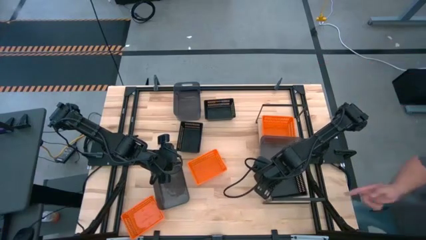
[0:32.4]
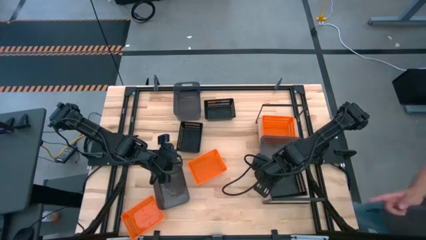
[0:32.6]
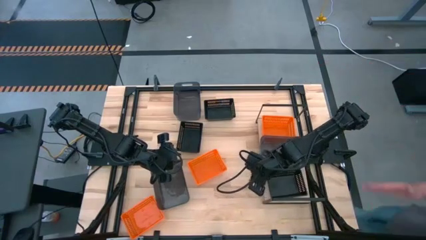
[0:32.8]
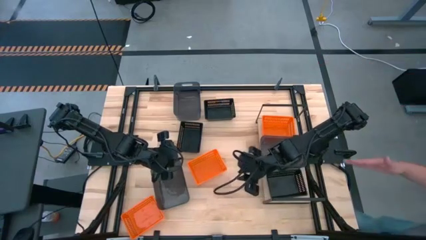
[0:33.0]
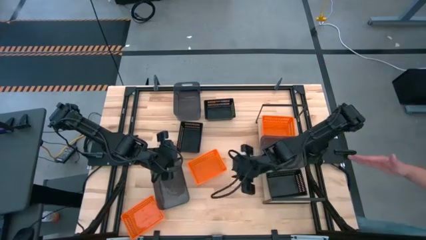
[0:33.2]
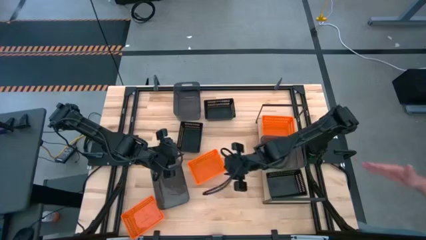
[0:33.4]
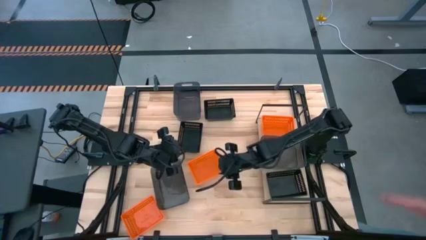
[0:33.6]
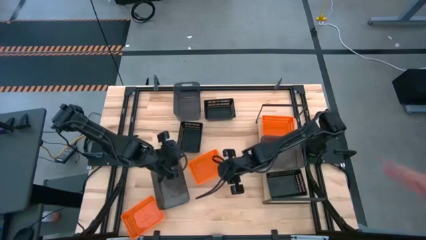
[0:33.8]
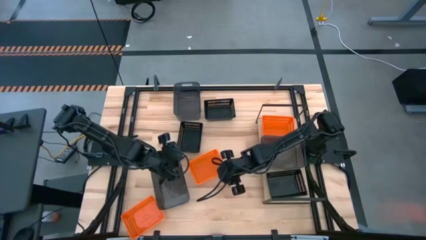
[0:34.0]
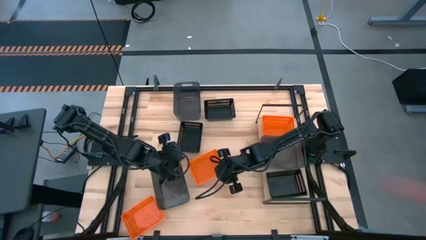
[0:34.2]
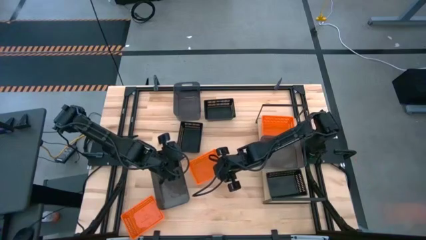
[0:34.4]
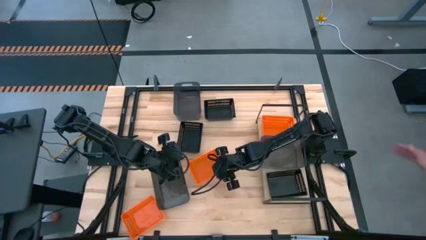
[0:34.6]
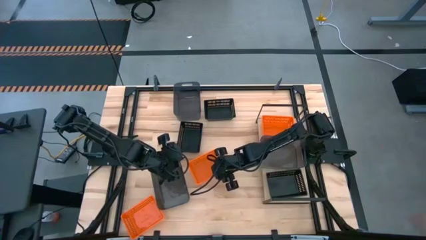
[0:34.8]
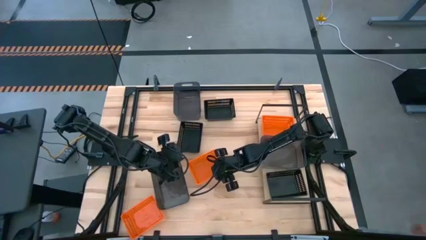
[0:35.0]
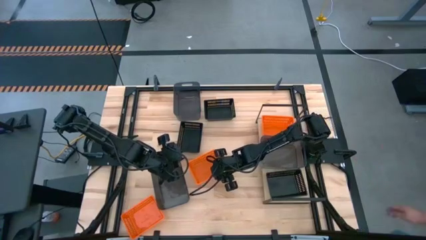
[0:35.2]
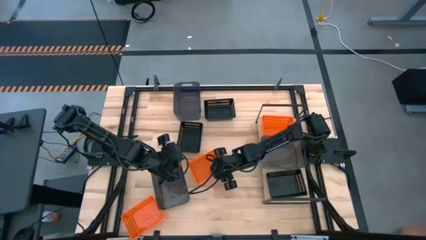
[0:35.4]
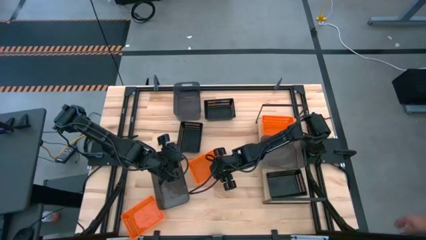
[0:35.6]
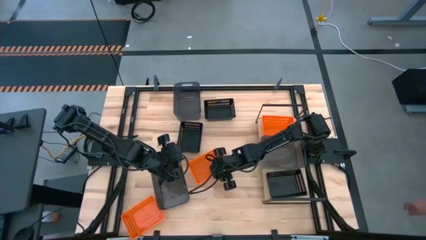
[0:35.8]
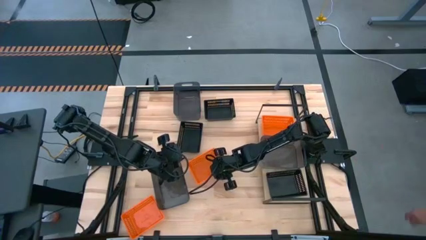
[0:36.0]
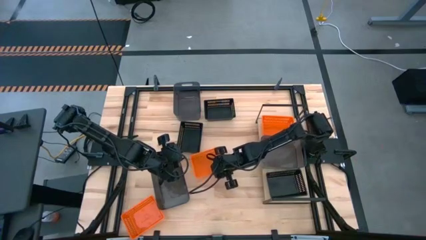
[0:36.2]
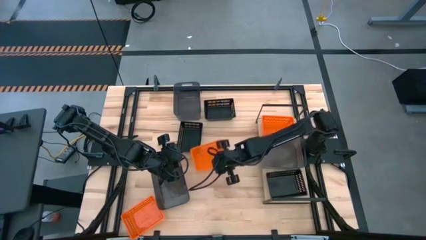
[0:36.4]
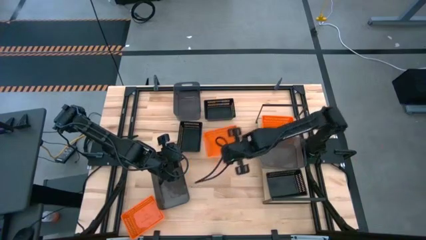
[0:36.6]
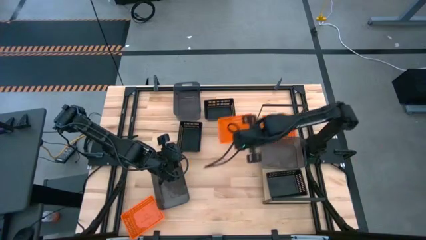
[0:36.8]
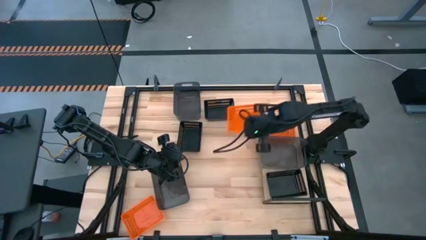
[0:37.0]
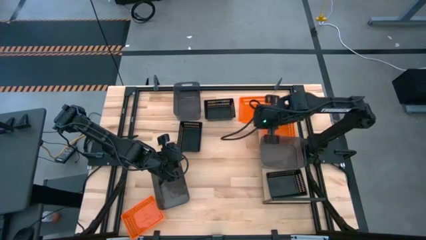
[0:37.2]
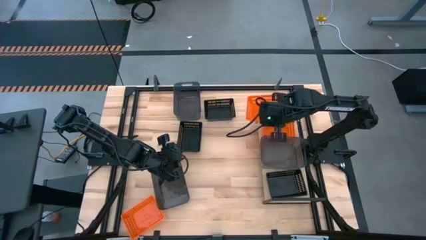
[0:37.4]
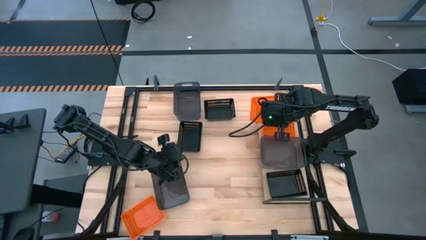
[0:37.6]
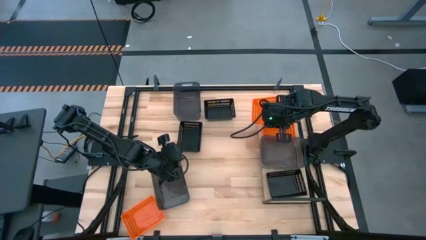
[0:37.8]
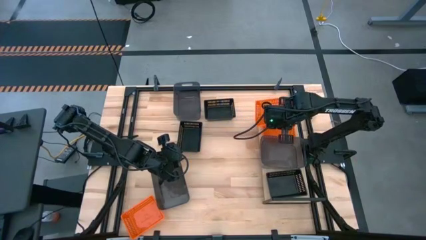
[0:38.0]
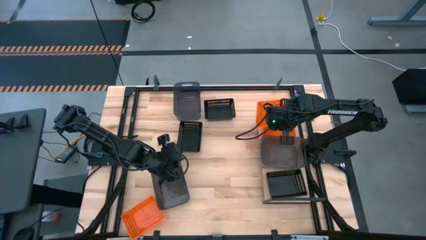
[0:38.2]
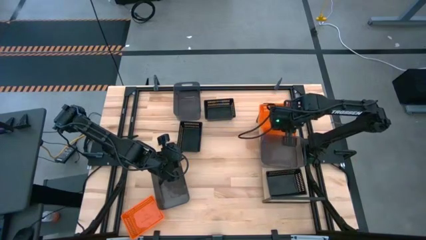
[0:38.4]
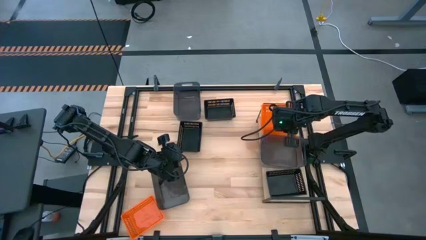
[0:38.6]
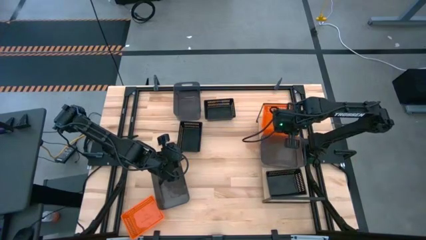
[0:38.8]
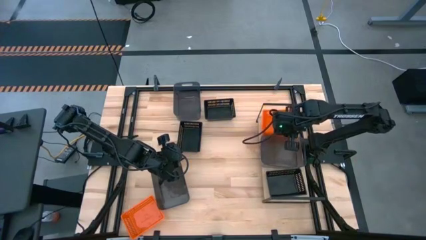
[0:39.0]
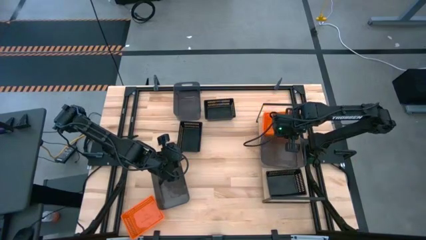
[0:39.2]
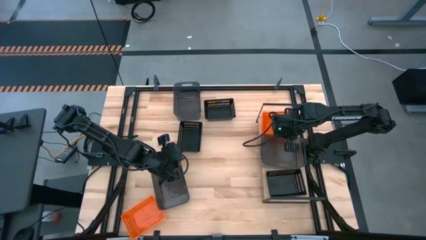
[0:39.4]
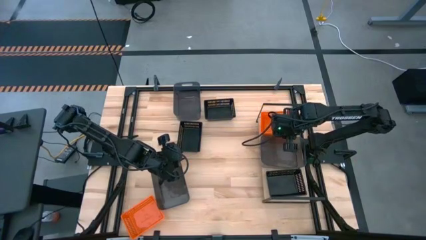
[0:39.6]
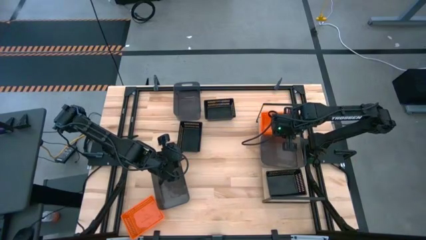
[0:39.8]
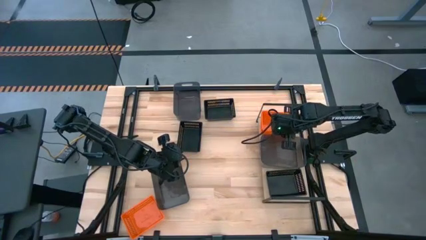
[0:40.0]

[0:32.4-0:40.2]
Task: Stack baskets on shelf by color
Stack the top orange bin on top of the orange bin on the shelf

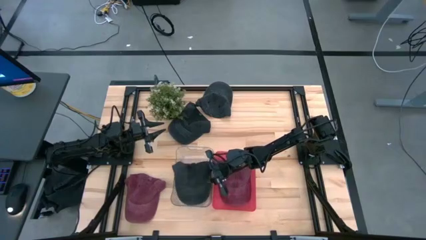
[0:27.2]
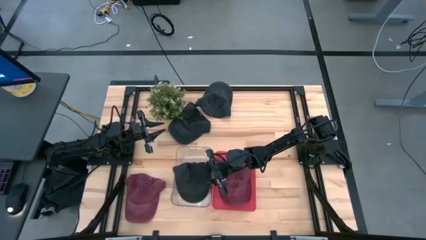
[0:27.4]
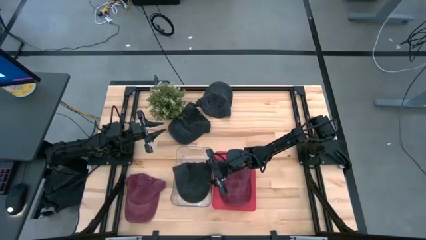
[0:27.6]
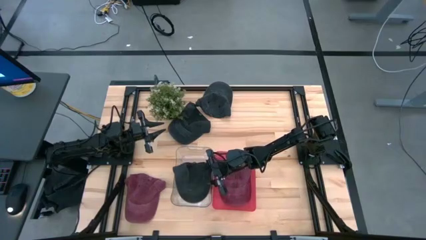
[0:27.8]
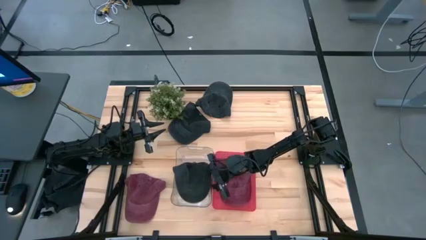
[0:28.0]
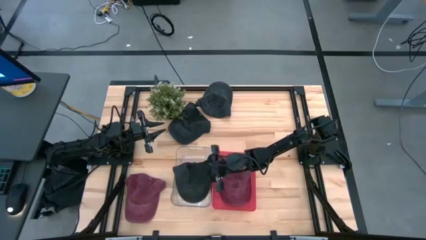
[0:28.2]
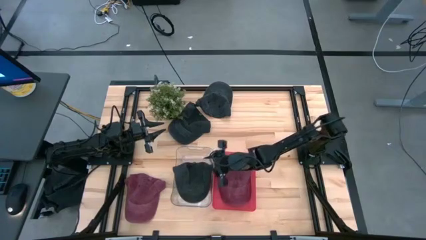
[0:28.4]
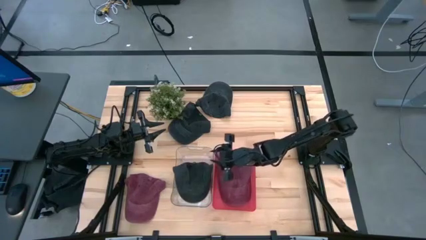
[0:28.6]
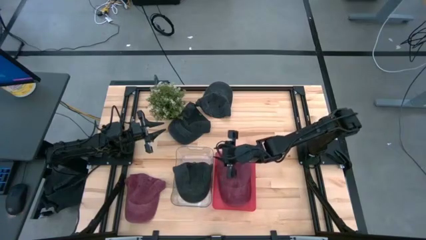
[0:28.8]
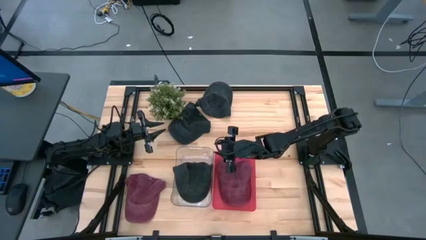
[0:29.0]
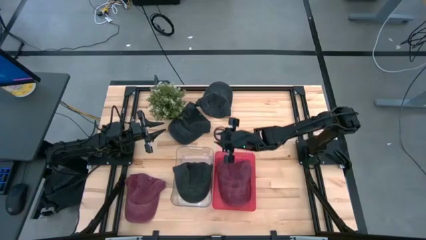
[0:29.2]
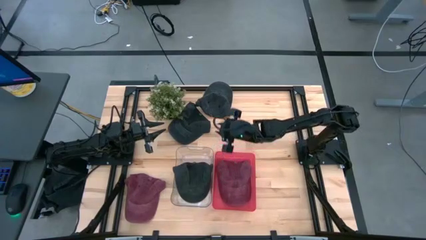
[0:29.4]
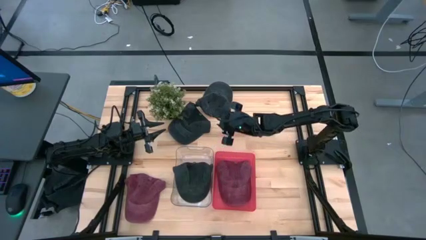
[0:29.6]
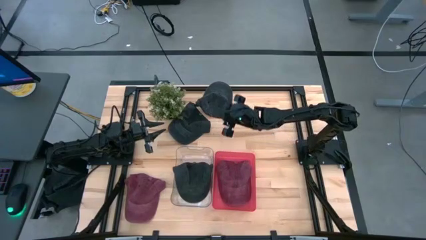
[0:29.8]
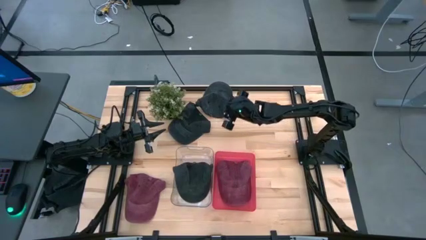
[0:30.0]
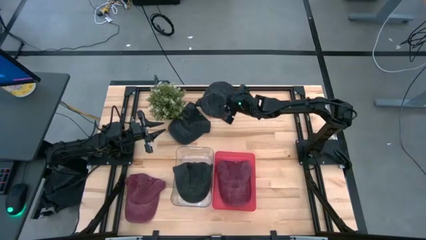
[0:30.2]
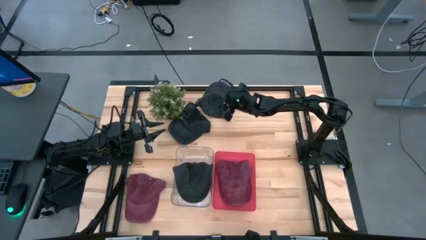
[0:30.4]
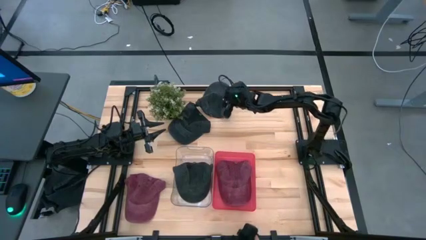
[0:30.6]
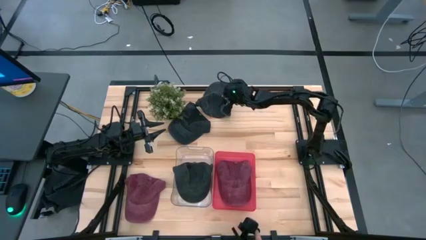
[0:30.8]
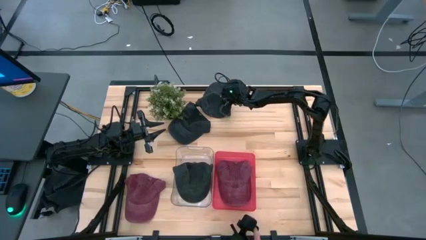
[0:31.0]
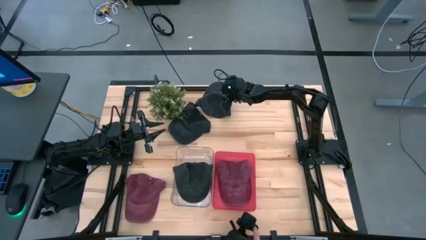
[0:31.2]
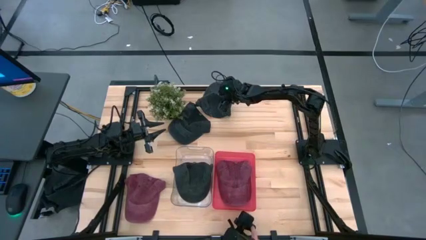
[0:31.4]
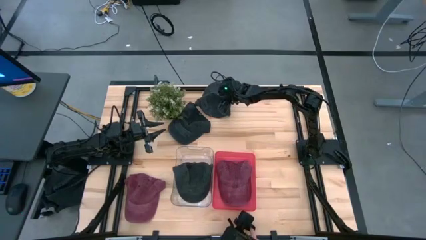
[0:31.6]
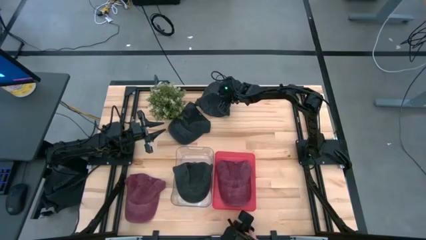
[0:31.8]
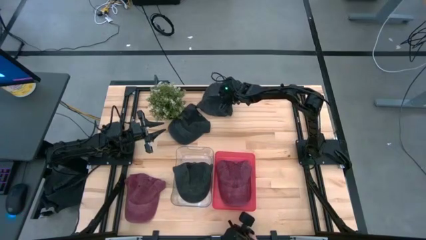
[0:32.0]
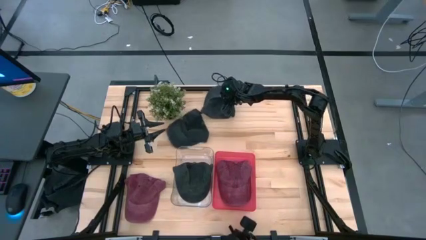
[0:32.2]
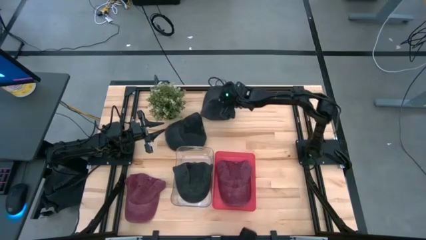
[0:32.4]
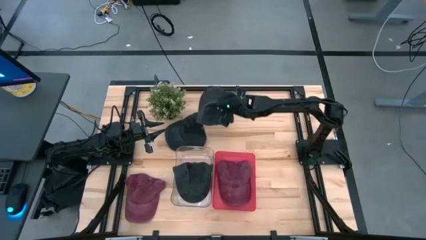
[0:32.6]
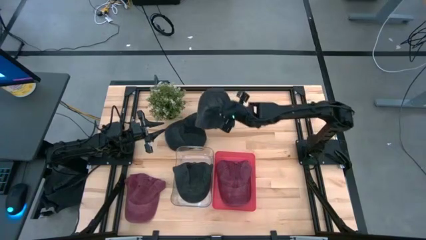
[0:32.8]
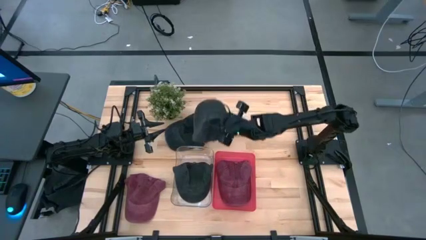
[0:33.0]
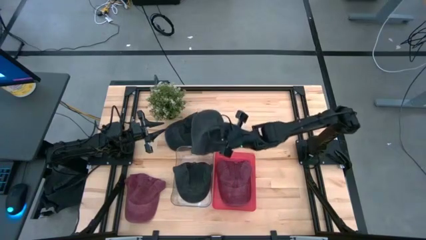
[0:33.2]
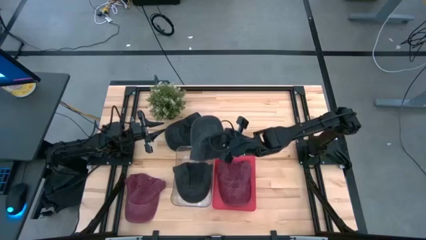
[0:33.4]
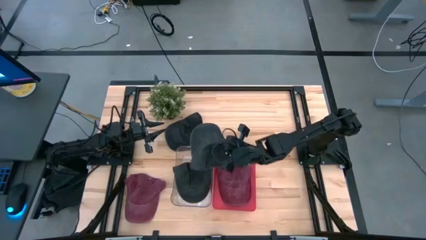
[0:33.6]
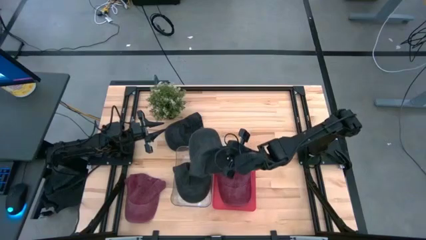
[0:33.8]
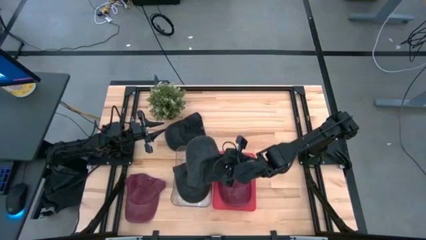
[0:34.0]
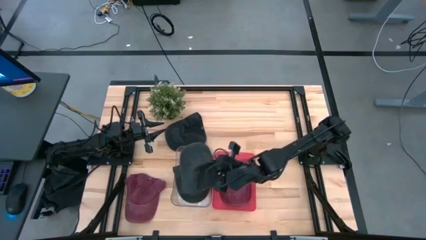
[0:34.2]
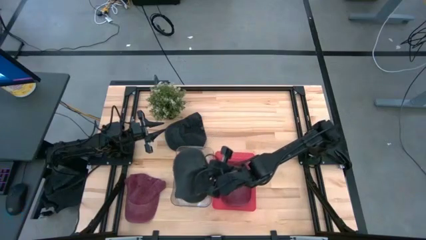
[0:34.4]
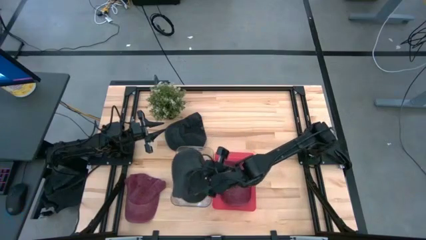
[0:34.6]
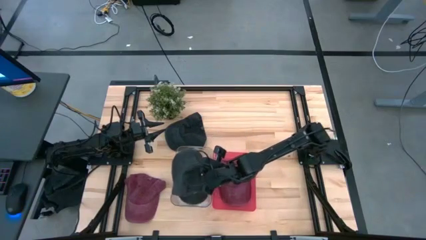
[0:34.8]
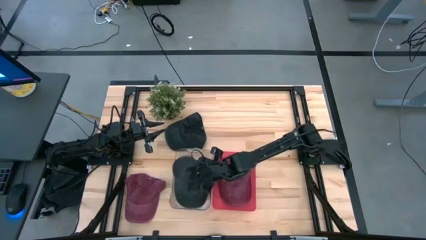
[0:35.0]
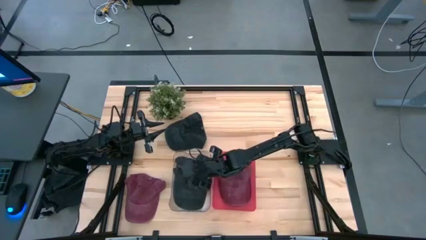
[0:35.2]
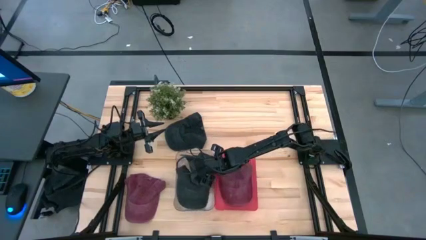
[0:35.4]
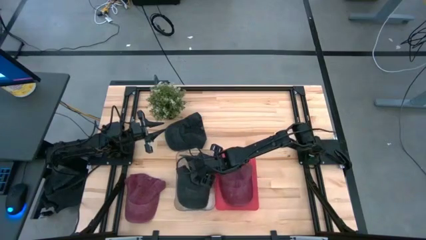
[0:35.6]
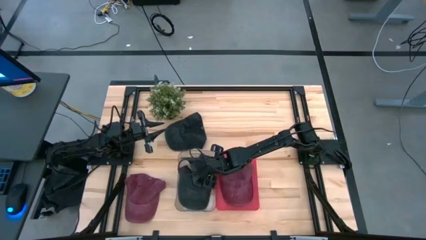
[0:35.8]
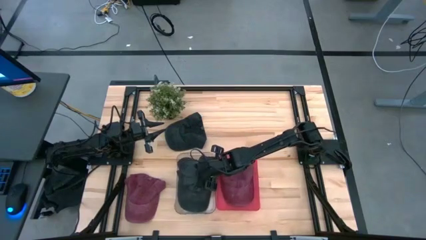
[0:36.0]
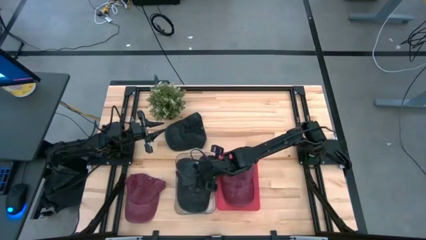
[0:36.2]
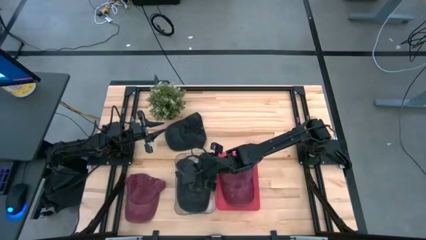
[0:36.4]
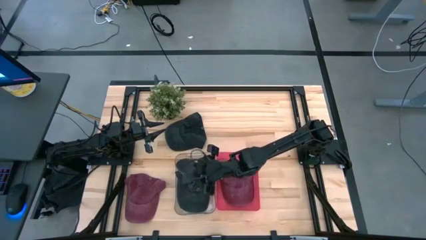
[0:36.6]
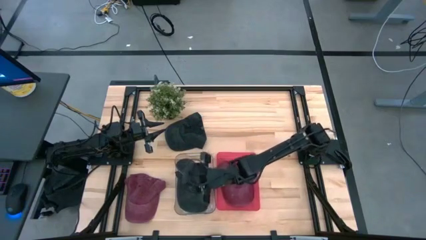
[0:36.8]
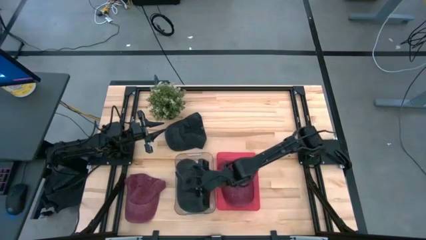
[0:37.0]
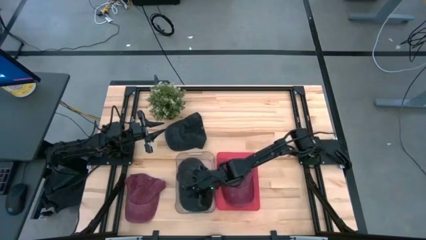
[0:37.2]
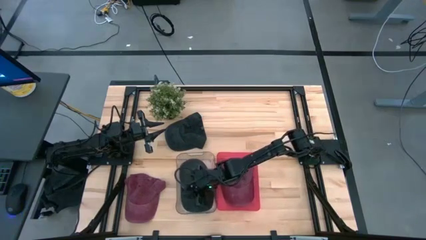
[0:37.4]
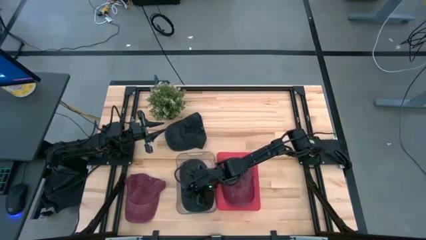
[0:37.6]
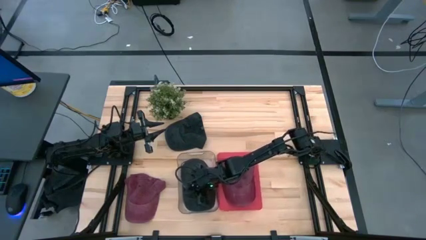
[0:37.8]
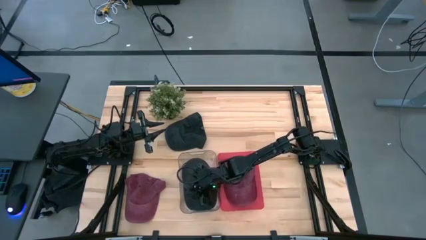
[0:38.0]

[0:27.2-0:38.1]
Task: Pick & Place hat
Put the top black cap into the transparent bin
